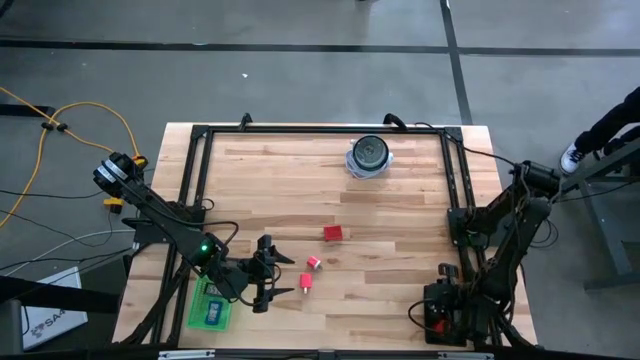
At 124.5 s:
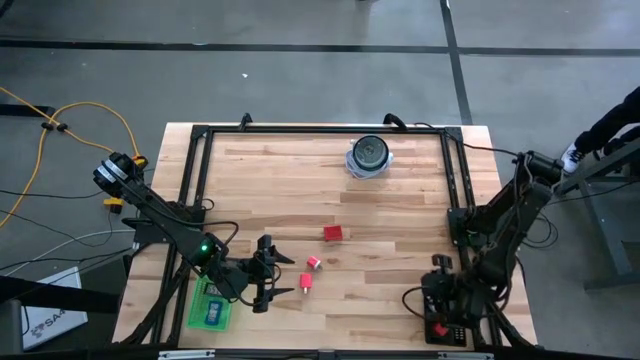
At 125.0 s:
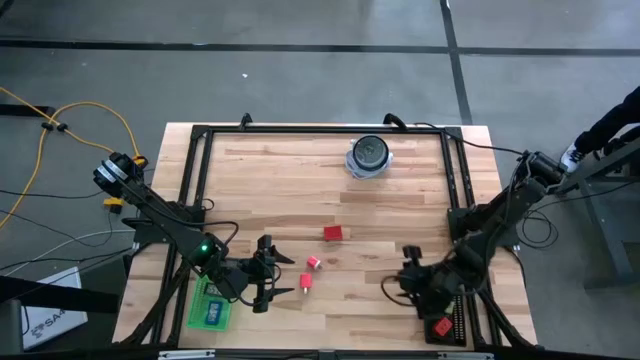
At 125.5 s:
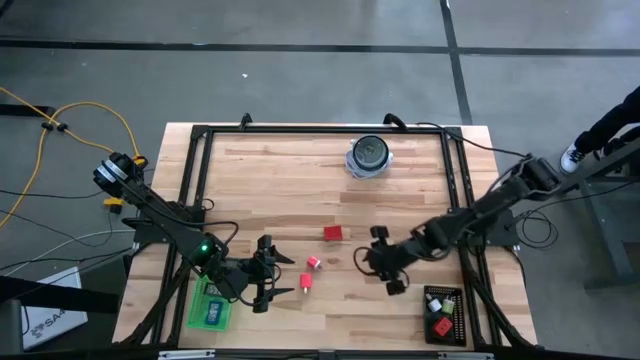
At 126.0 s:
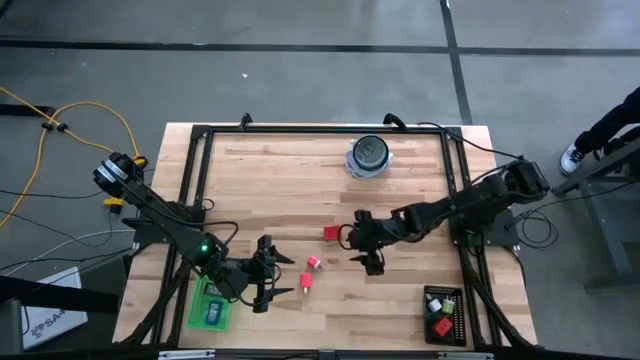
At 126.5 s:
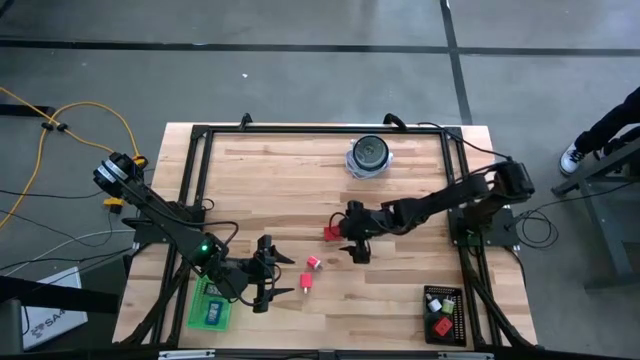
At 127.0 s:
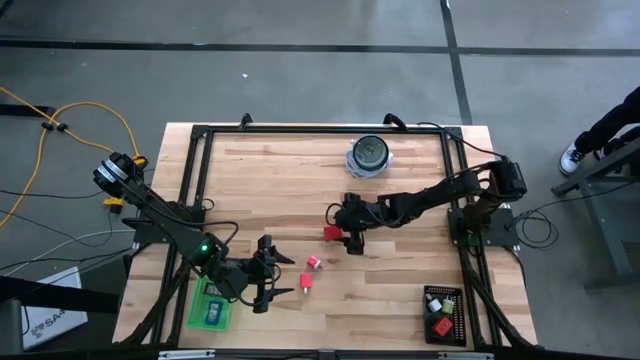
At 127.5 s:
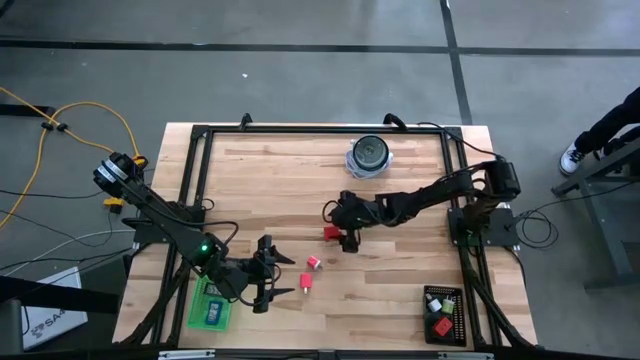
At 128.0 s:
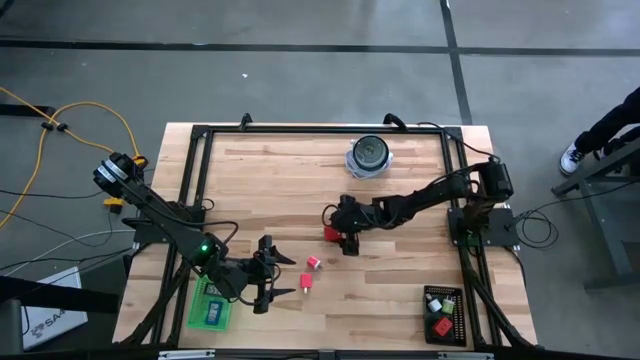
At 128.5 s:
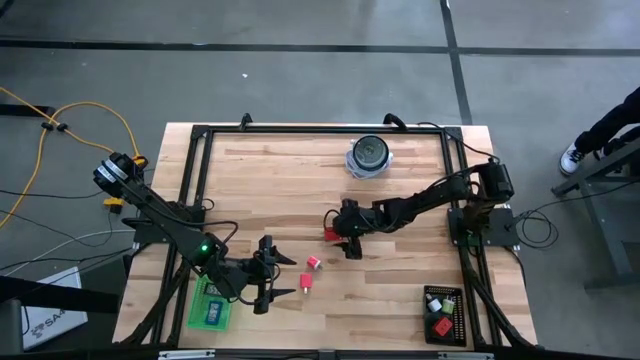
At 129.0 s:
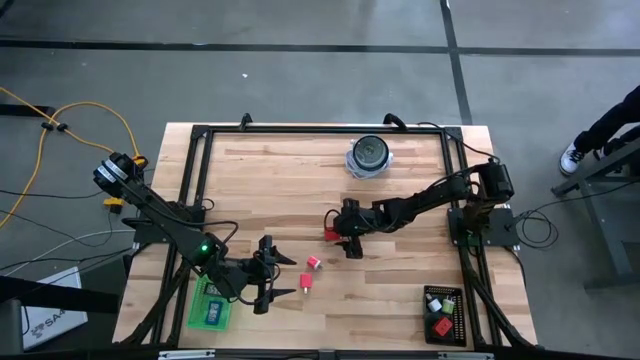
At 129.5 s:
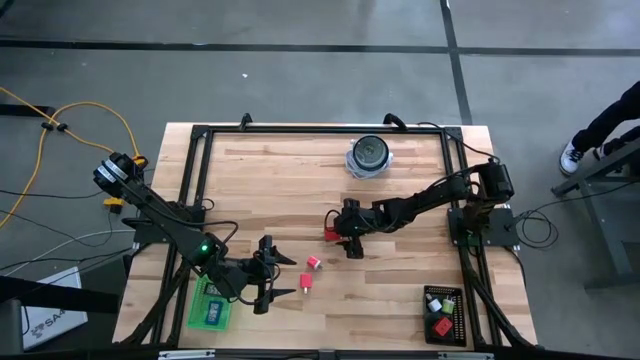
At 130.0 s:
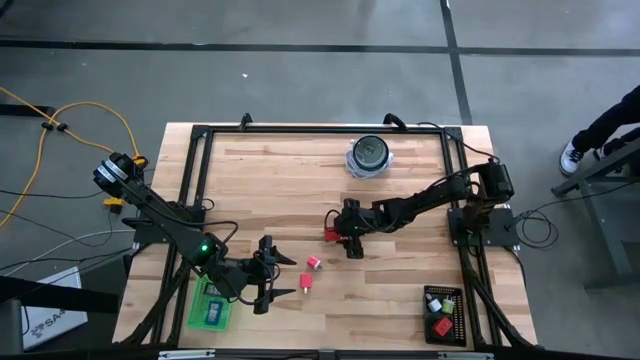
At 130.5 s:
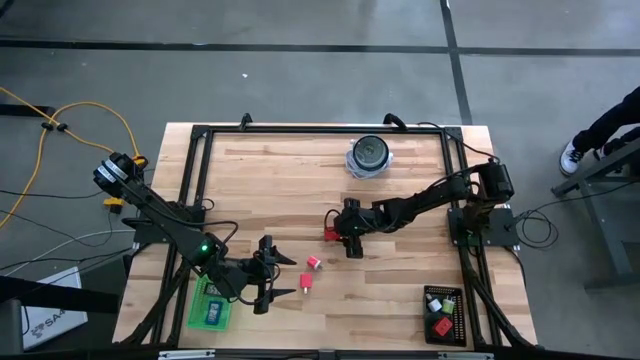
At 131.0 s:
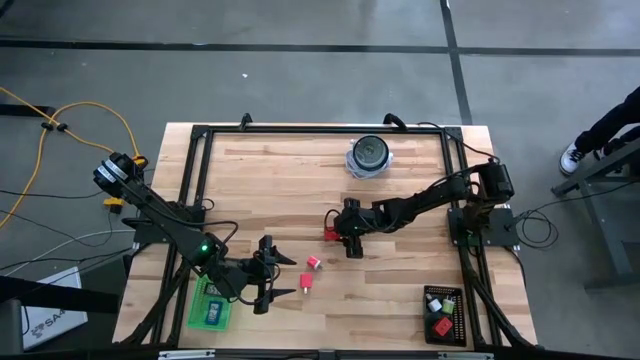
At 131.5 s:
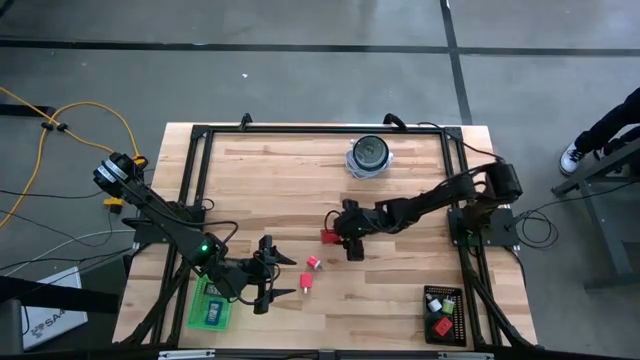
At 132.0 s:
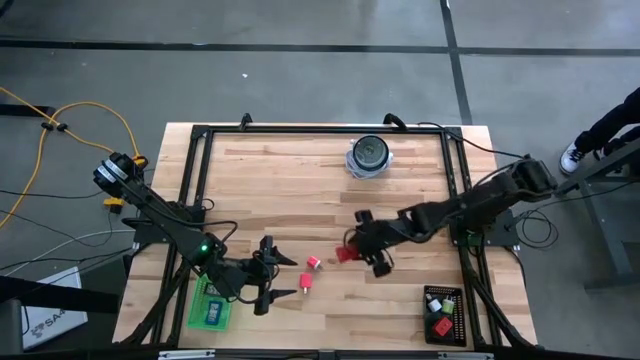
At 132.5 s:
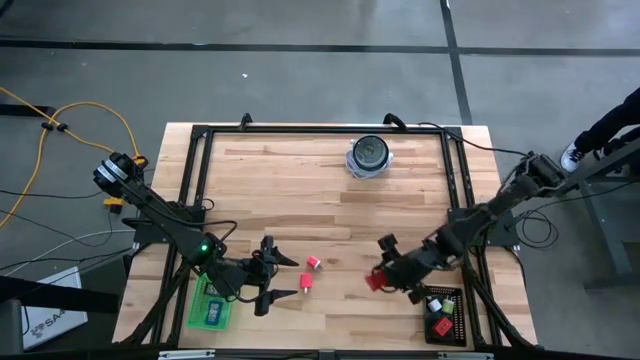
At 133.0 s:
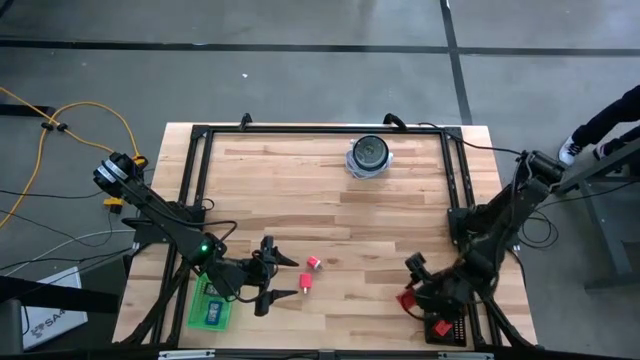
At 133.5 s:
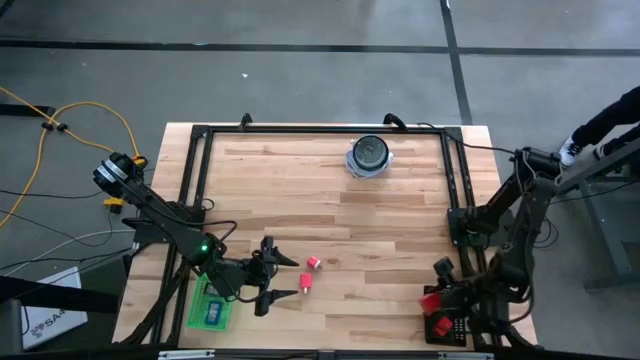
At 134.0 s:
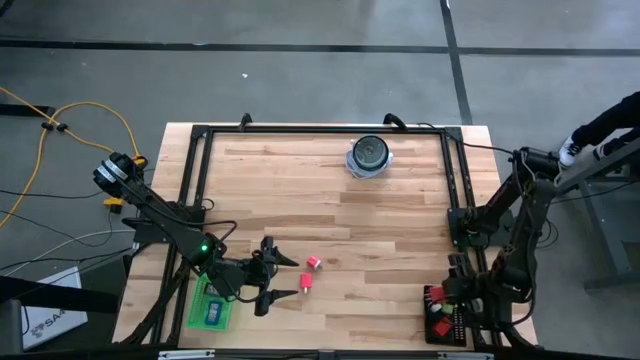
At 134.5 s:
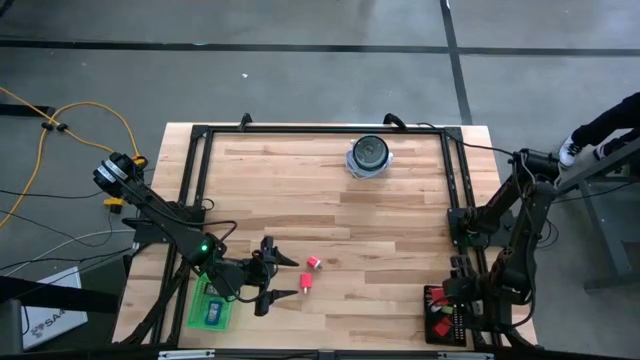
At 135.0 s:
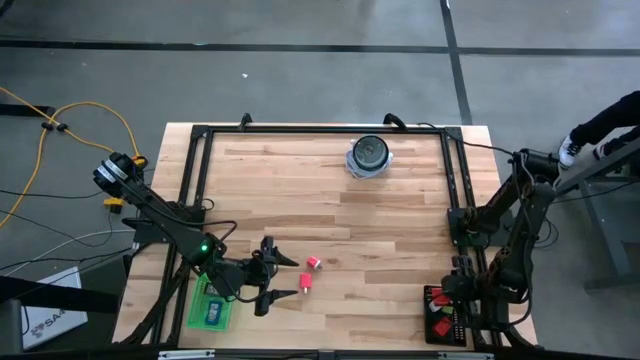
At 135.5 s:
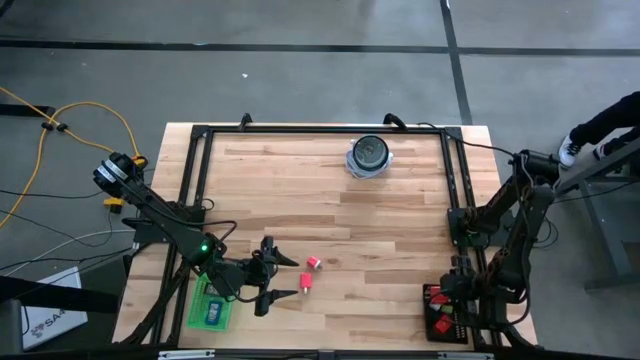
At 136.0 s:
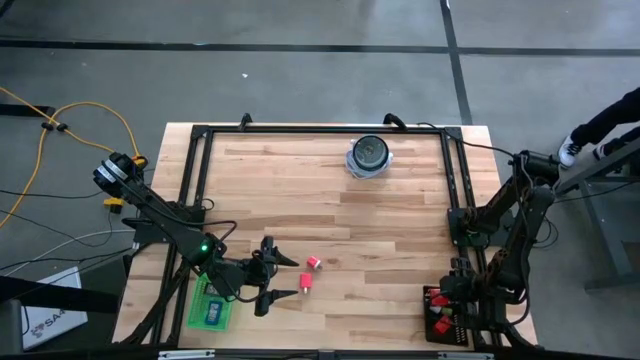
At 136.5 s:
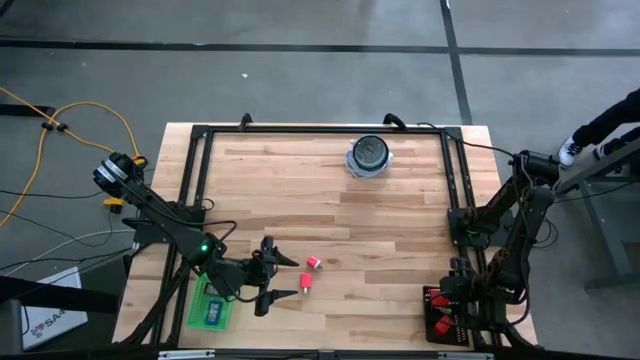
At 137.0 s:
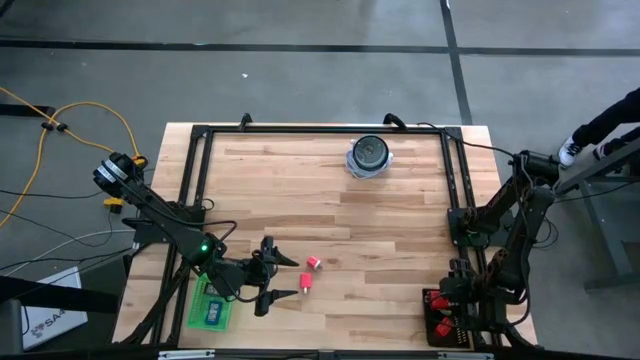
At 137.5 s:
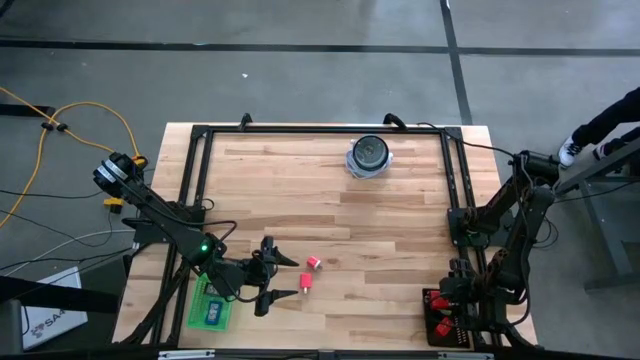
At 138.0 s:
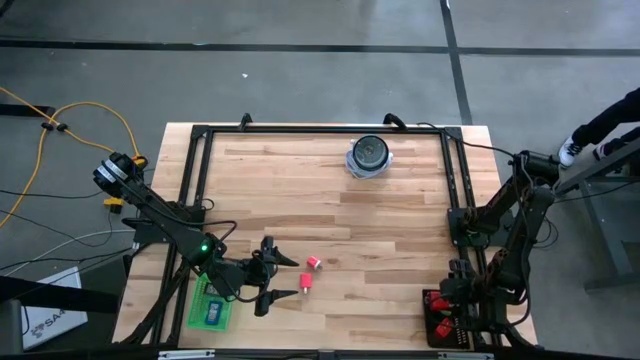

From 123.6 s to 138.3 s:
Task: Pick & Place Office items
Put the red charger adapter into the black bin

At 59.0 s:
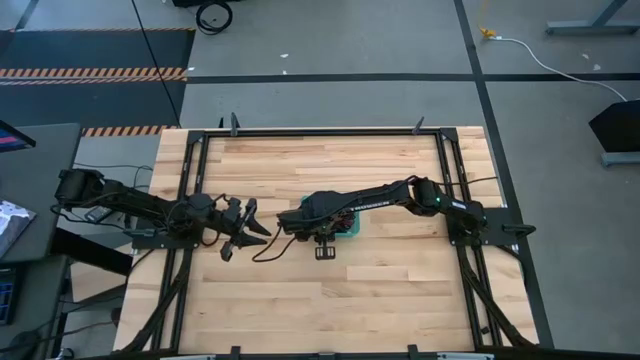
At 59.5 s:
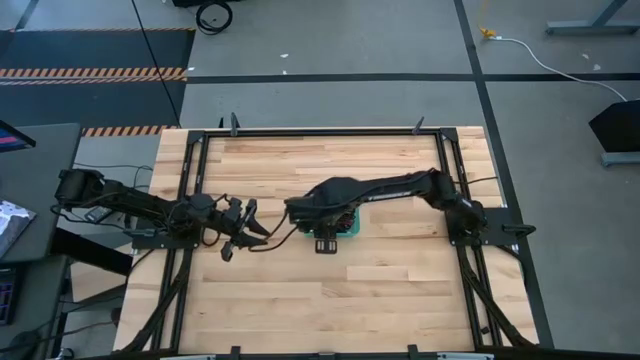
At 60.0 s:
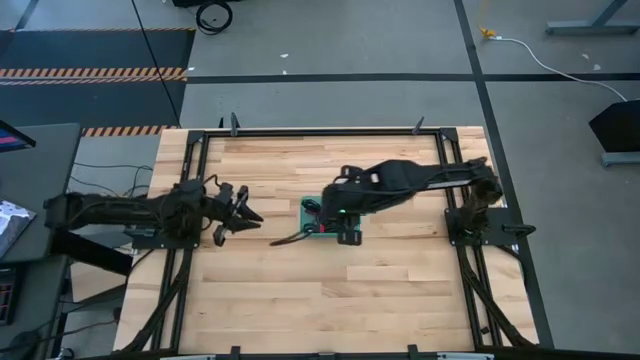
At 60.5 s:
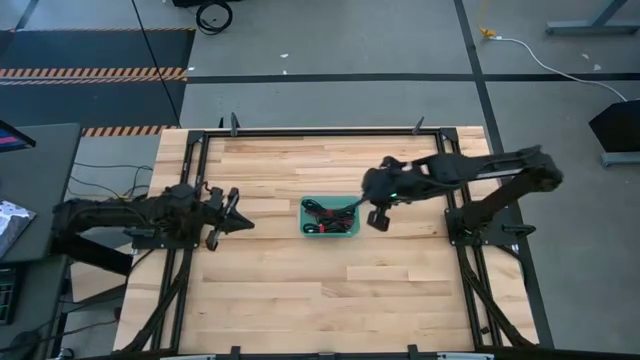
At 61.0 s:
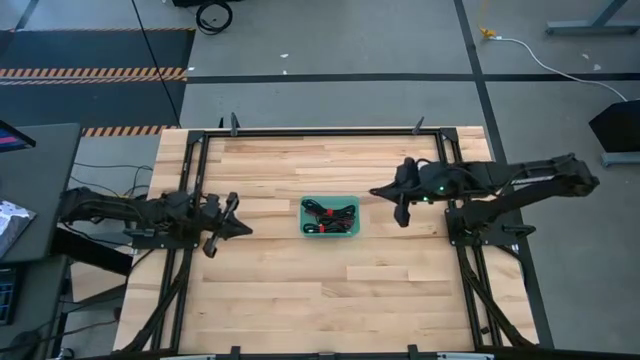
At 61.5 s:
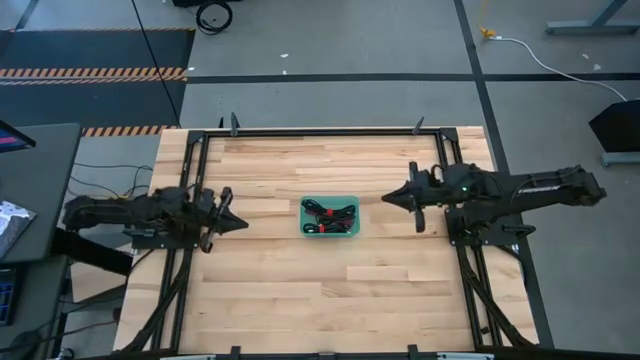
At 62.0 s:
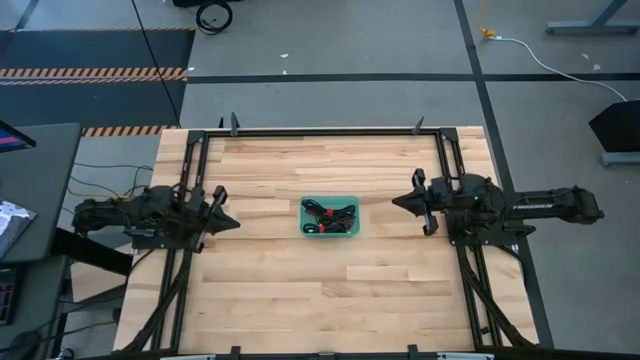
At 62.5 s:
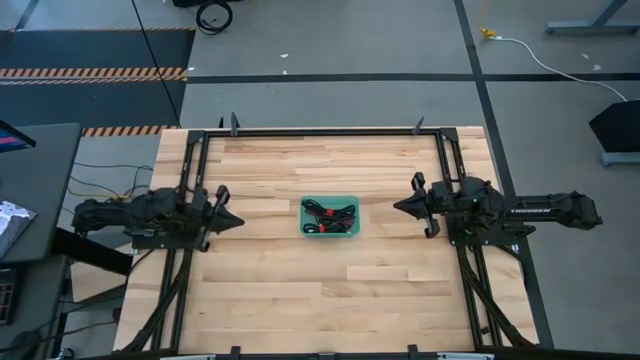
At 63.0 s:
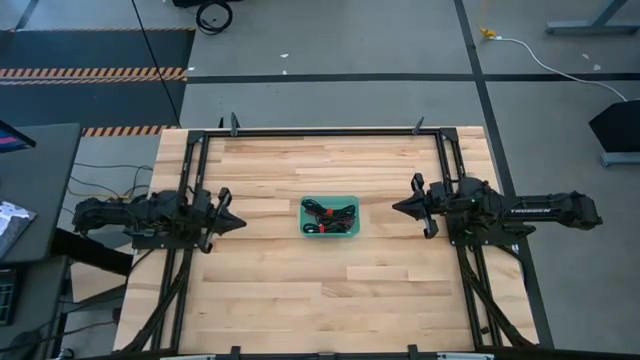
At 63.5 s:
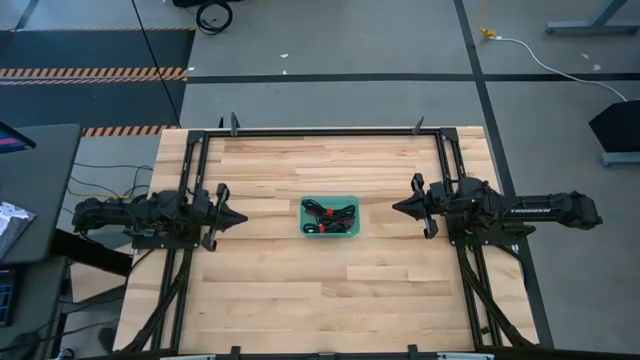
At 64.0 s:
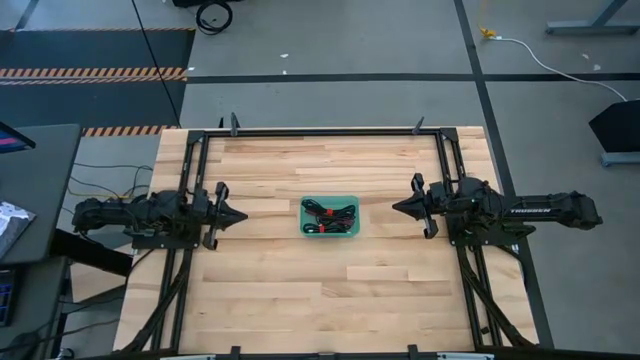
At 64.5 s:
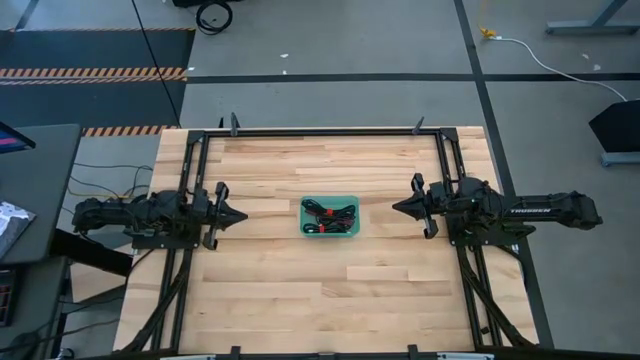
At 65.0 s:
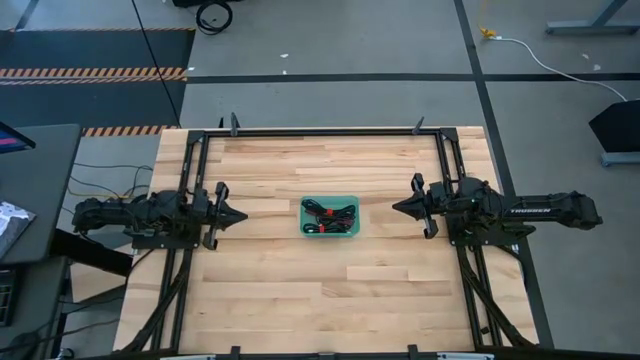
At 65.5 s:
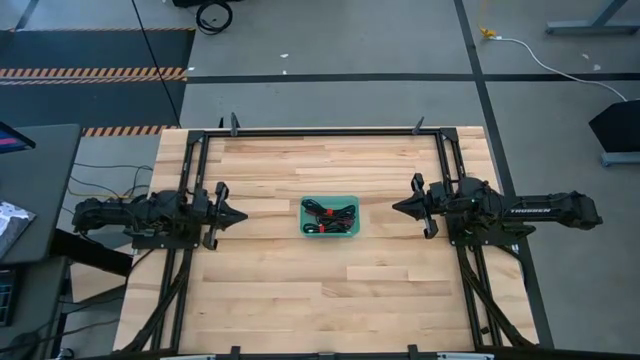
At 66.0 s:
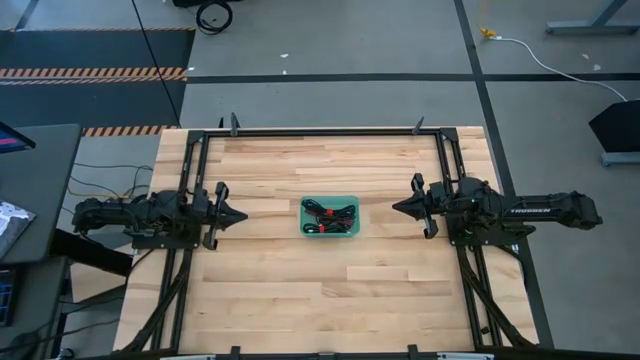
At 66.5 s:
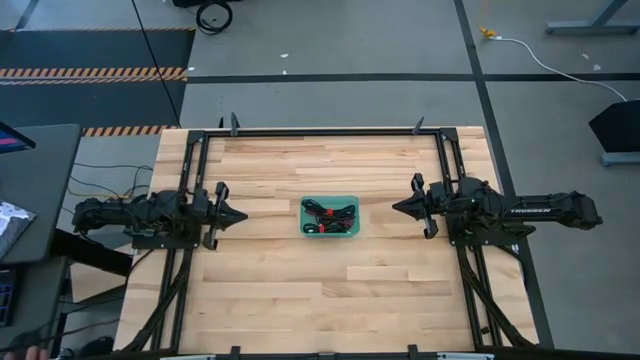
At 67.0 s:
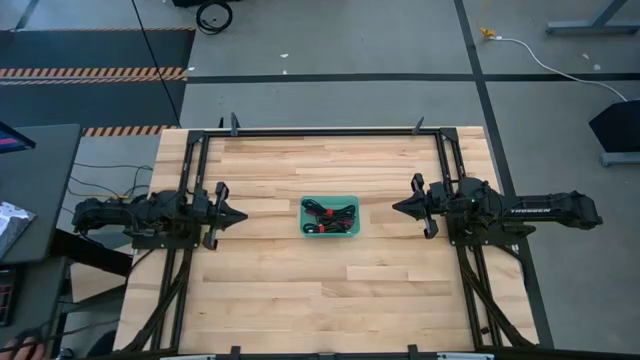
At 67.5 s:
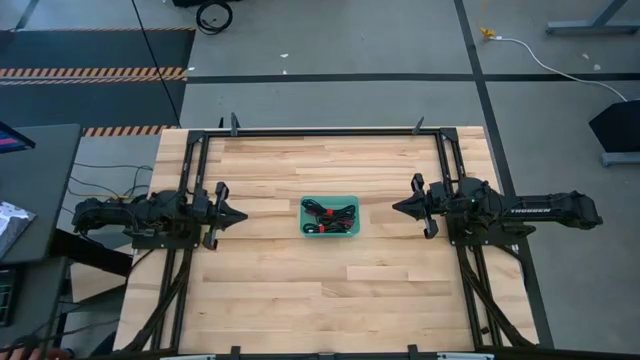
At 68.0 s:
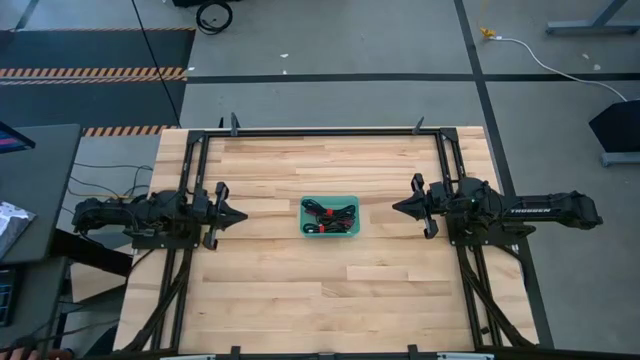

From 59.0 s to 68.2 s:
Task: Pick and place USB-C Cables
Return to Home Position
